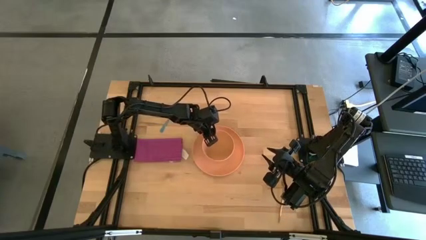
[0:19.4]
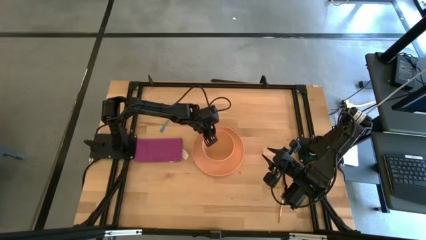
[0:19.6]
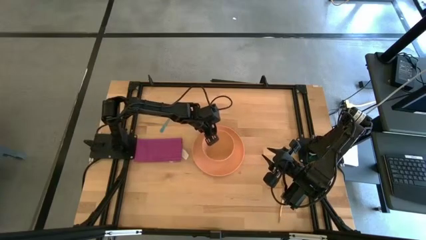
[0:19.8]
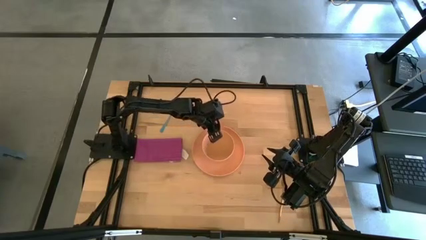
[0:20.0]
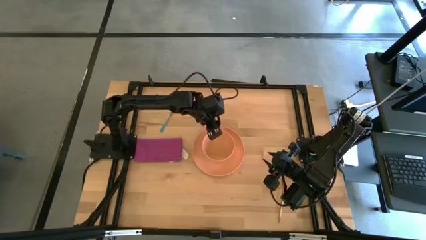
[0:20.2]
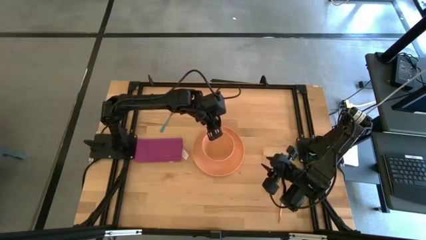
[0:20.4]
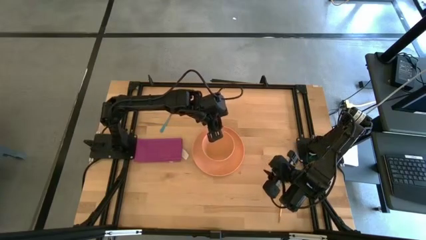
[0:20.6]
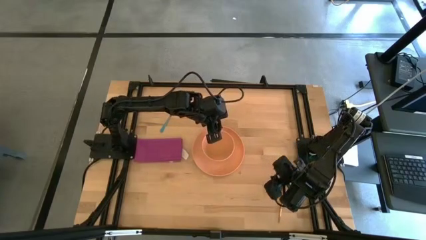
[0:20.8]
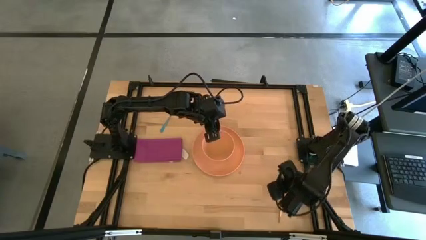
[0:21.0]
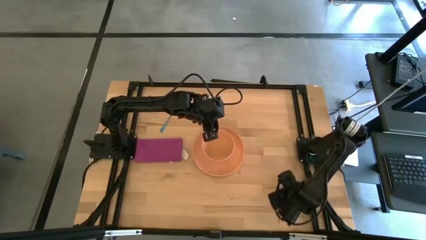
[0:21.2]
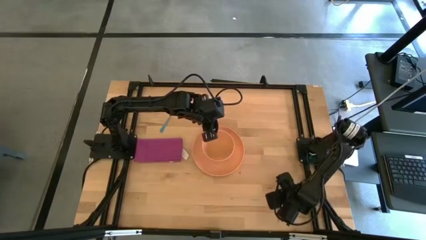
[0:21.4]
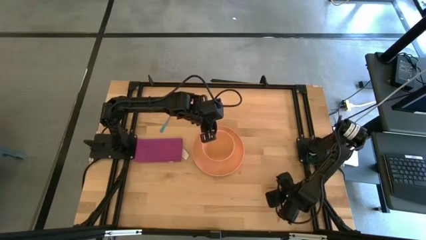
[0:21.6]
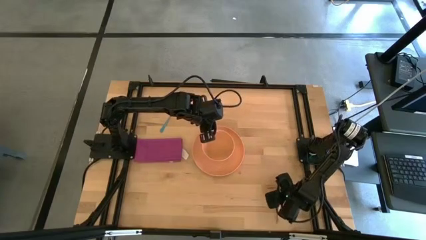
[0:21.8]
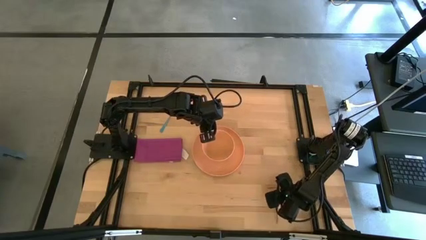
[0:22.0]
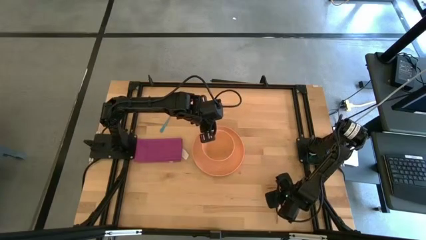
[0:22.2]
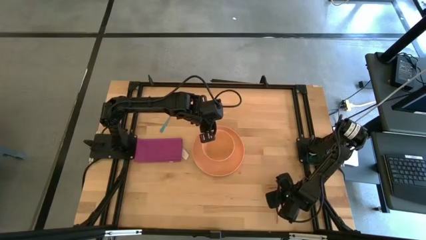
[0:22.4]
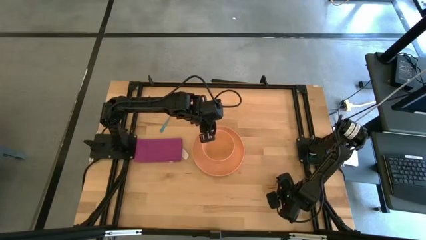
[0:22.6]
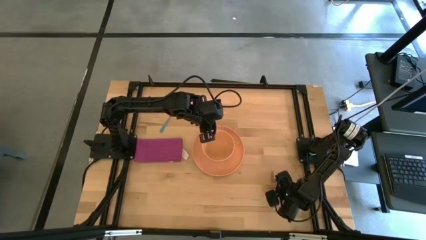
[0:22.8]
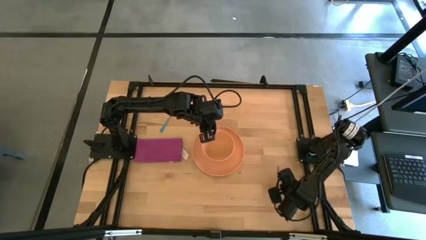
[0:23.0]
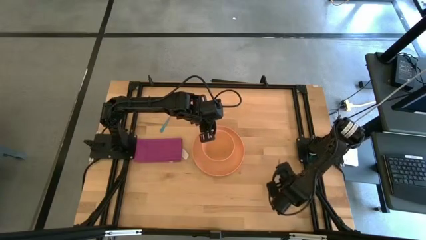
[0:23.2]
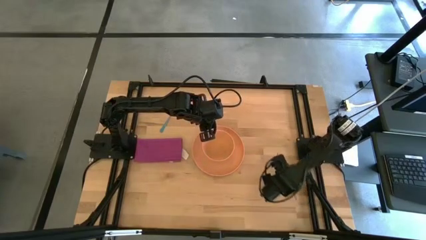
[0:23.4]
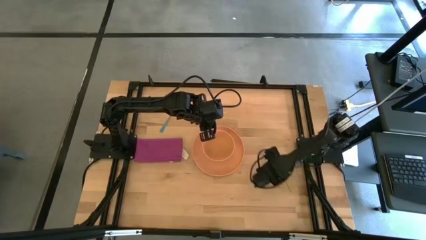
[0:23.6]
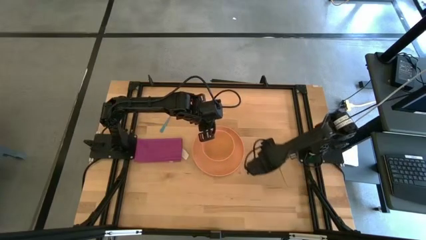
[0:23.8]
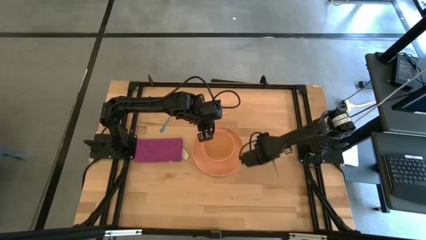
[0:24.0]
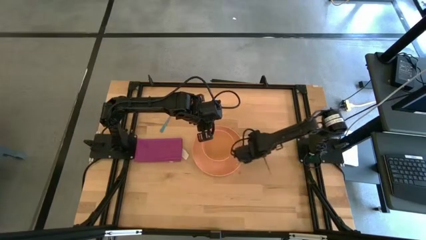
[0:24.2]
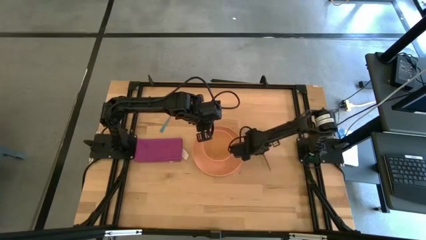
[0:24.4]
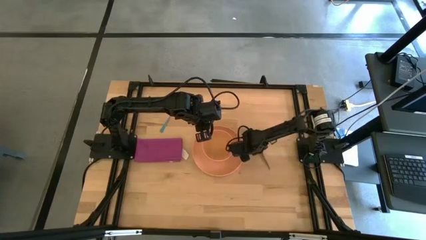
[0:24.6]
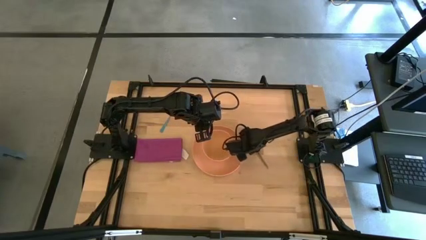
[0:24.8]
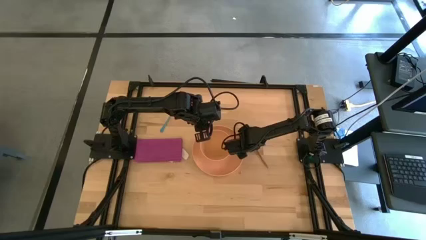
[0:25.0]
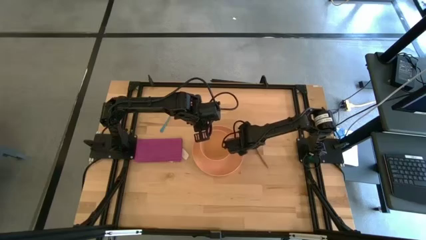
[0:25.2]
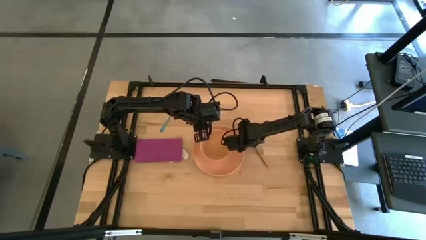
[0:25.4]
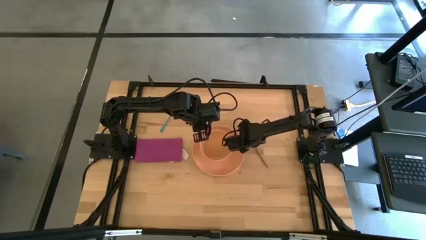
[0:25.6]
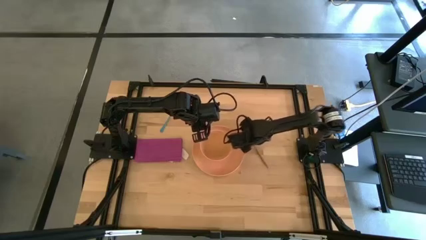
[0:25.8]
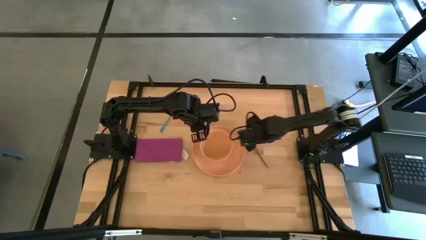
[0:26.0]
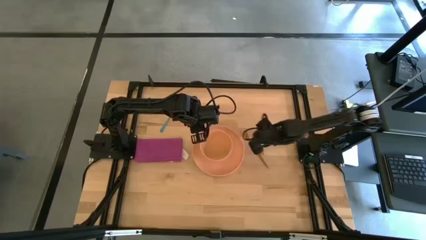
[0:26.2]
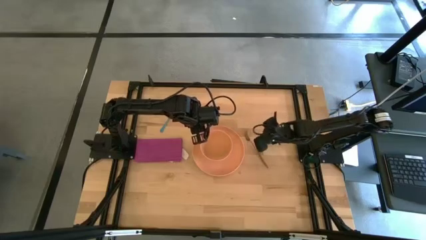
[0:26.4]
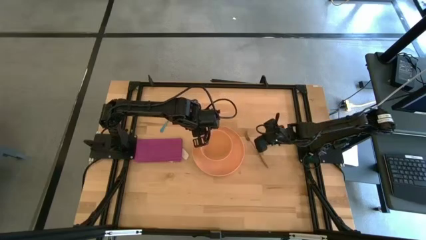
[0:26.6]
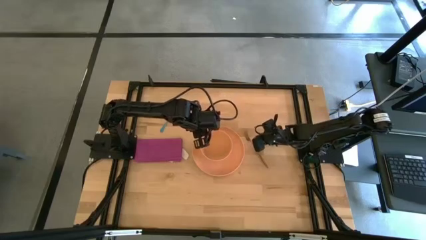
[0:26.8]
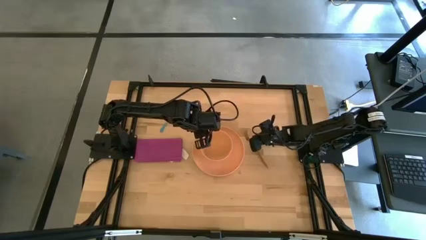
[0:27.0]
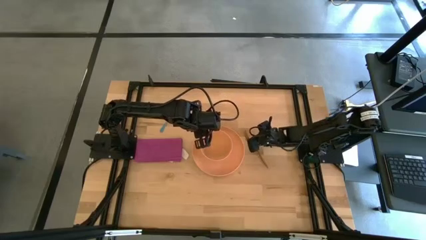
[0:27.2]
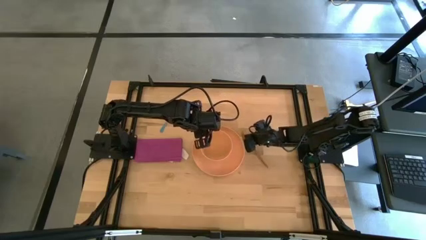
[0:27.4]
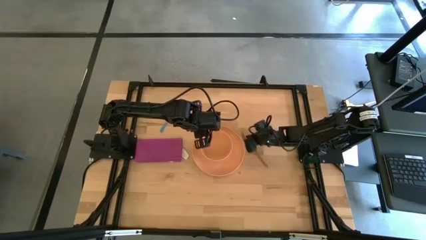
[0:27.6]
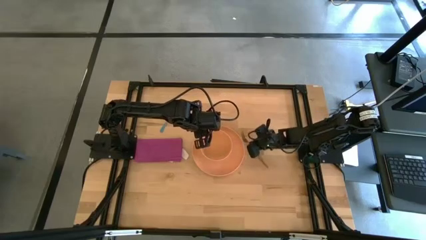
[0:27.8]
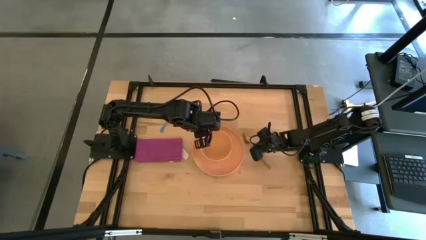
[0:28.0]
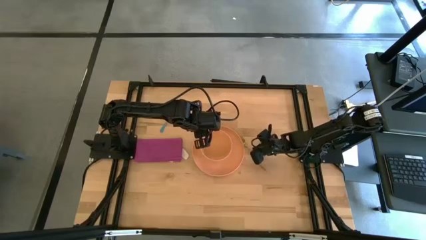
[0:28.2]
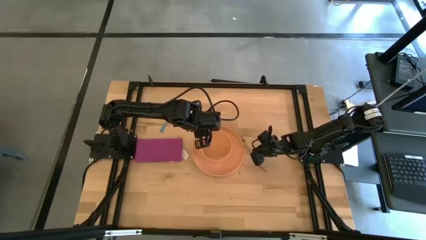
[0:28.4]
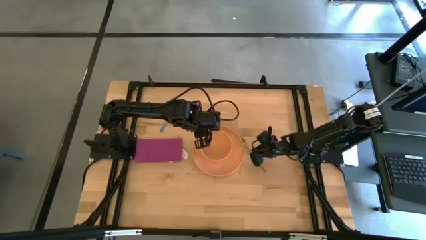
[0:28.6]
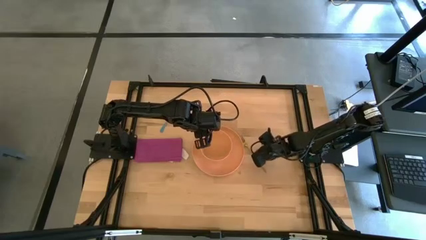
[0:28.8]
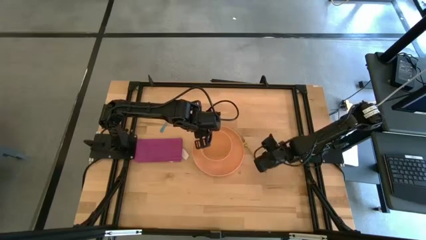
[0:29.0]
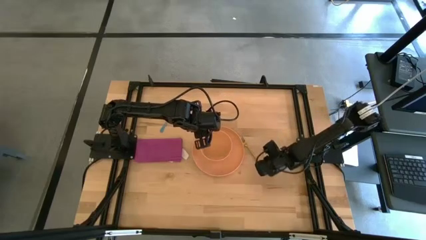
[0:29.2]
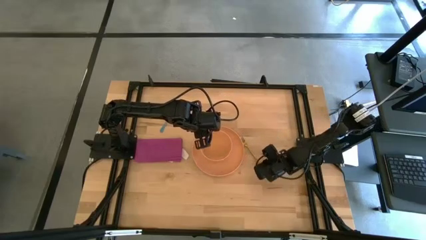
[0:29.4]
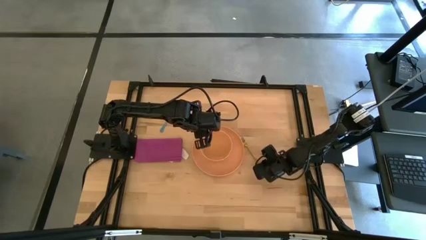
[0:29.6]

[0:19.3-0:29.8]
Task: Set table place
Move the gold fork to the right of the orange plate

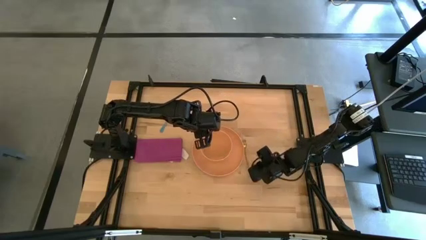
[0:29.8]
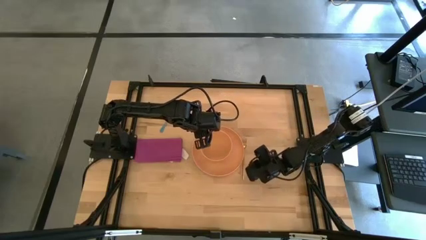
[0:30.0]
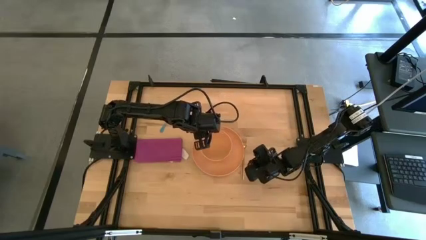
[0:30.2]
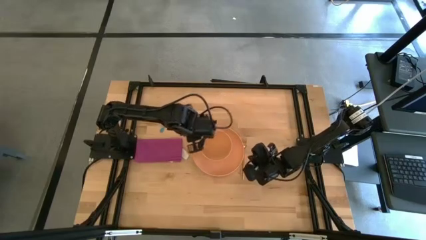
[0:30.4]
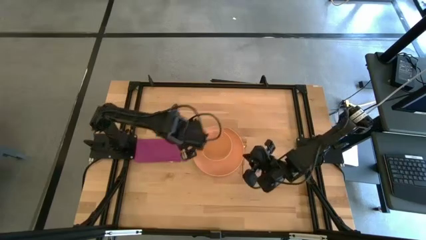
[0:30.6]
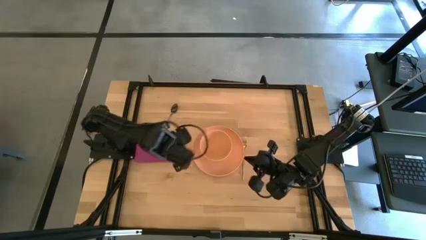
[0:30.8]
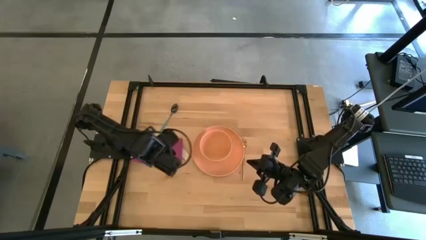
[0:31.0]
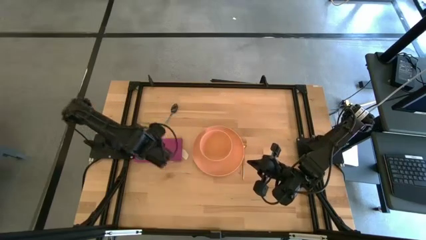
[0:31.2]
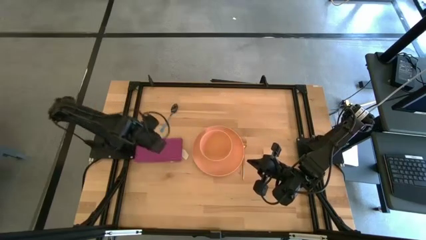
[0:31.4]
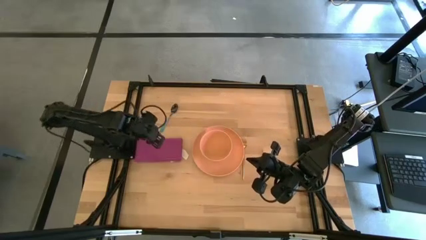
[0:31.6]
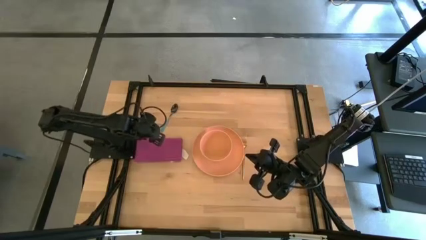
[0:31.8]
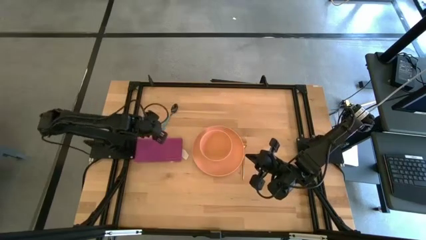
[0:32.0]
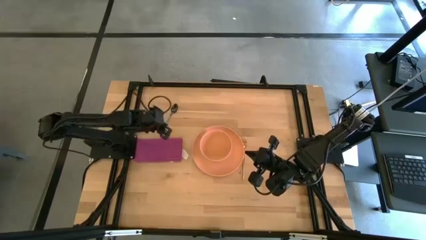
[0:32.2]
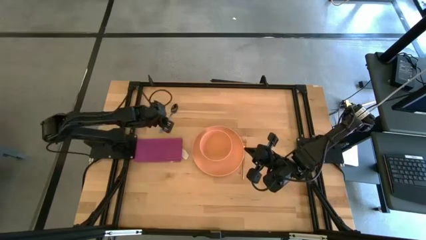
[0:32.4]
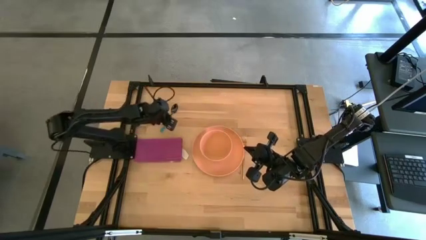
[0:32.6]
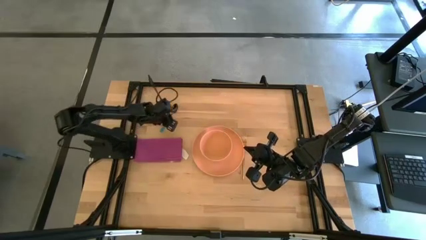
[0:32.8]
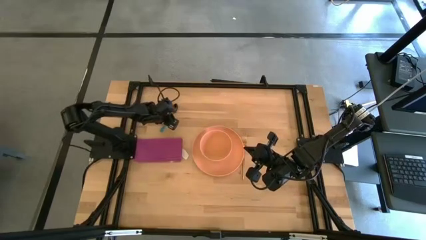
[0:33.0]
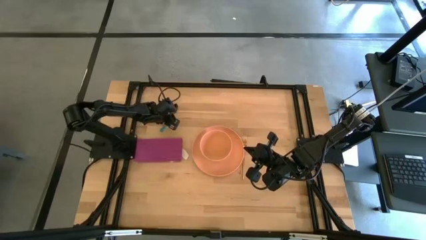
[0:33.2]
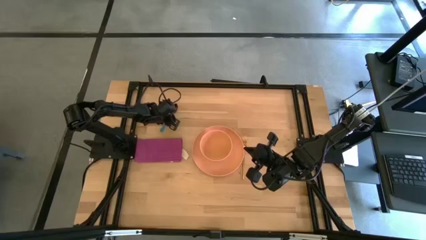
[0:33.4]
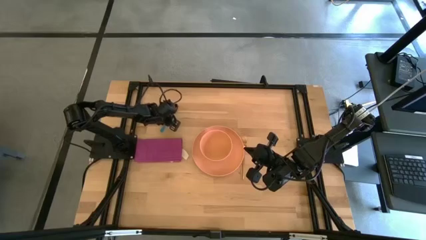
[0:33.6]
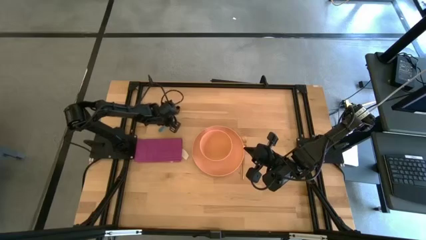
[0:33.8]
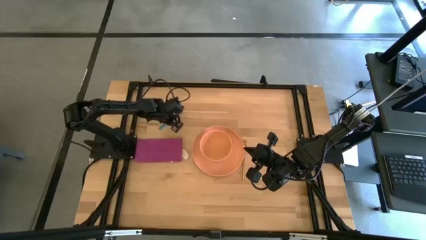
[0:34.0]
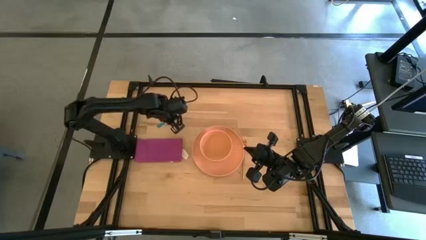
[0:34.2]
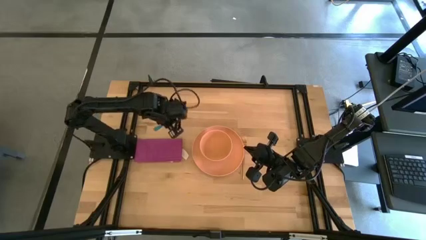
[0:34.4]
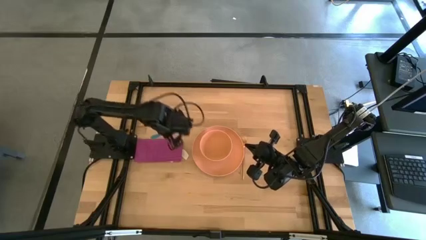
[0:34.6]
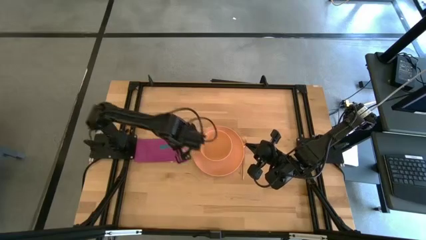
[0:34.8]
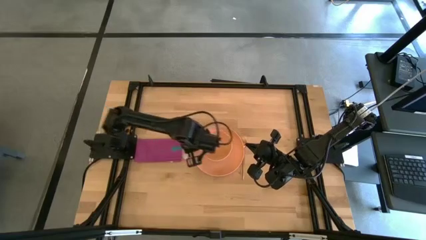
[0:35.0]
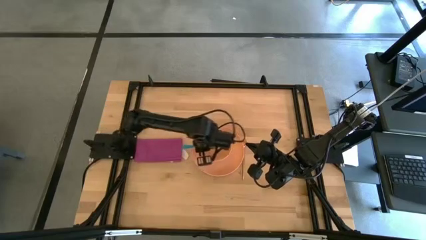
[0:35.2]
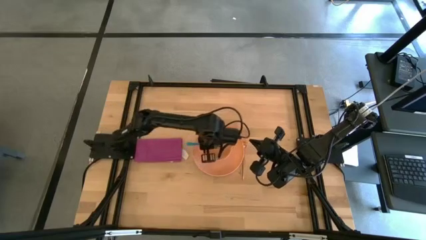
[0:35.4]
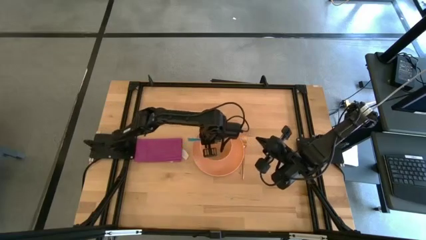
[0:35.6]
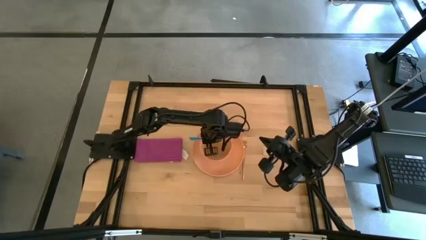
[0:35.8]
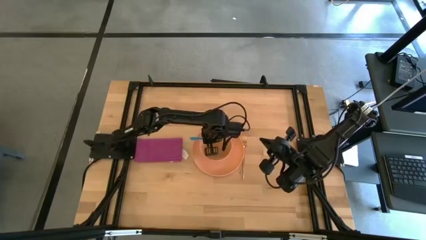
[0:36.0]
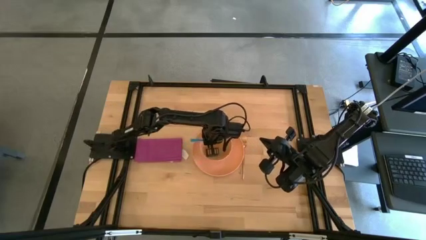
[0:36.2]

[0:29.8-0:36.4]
Put the blue spoon into the orange bowl
